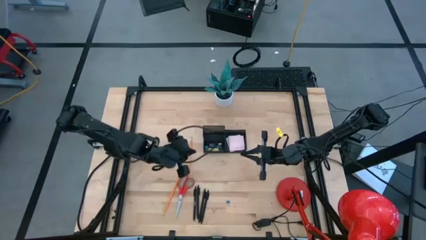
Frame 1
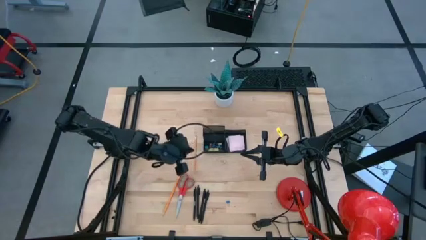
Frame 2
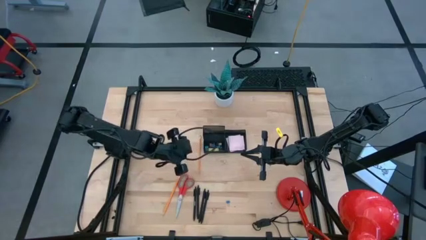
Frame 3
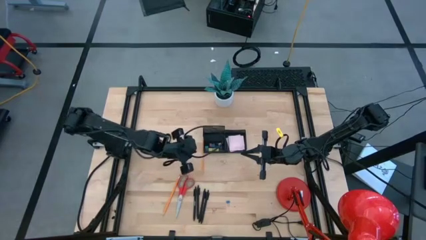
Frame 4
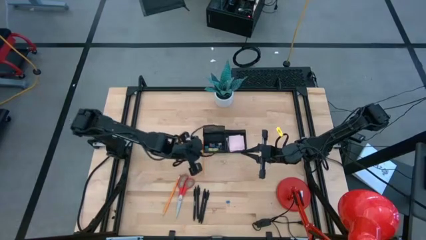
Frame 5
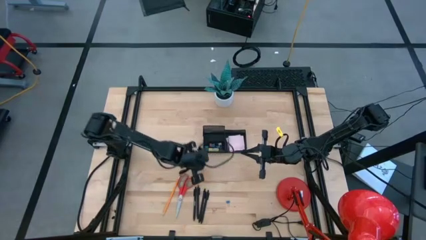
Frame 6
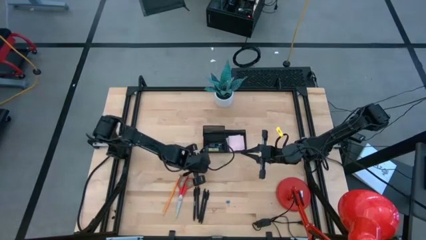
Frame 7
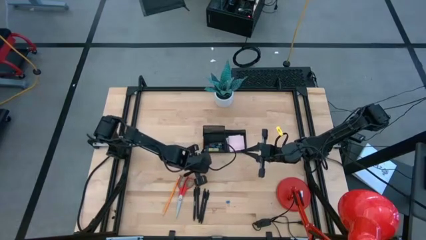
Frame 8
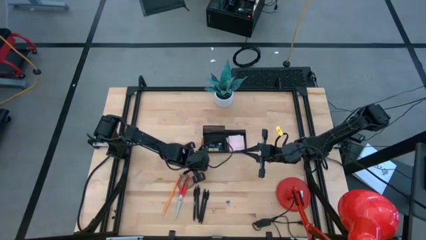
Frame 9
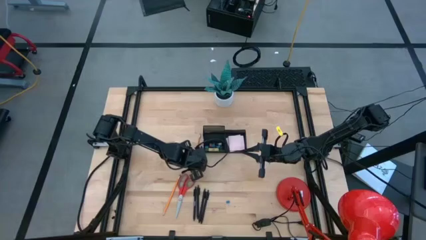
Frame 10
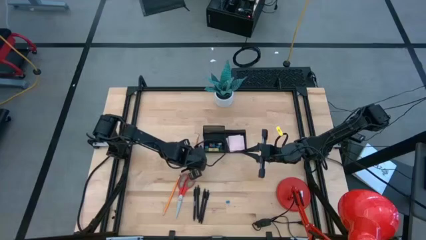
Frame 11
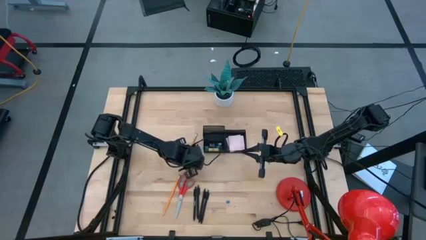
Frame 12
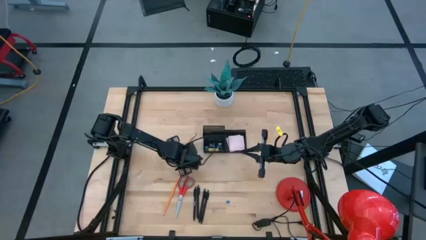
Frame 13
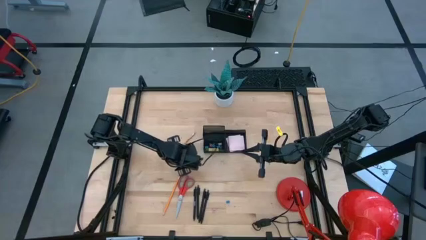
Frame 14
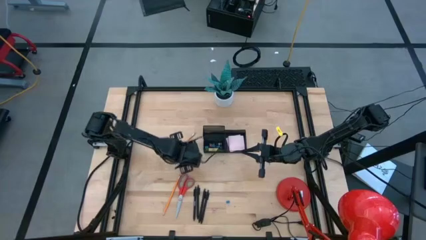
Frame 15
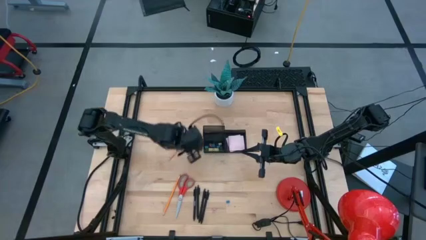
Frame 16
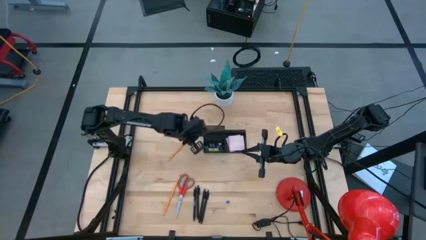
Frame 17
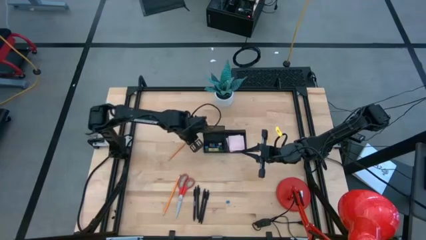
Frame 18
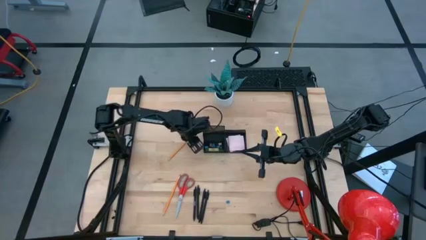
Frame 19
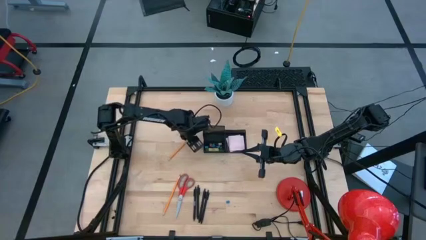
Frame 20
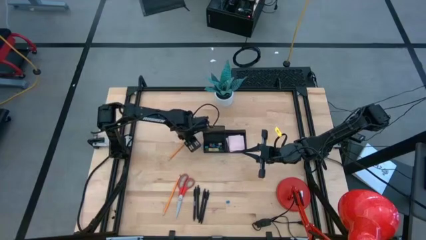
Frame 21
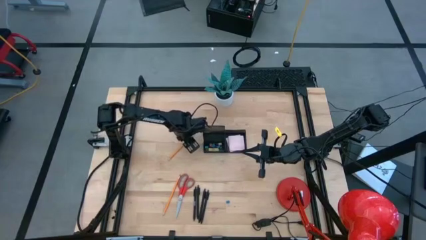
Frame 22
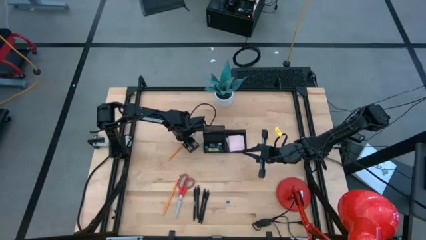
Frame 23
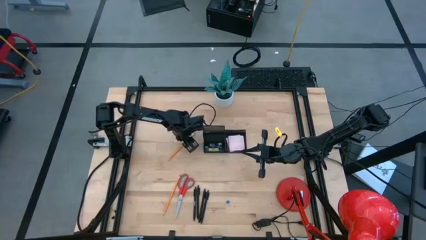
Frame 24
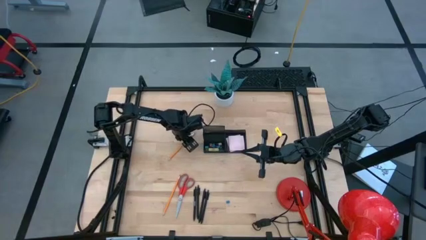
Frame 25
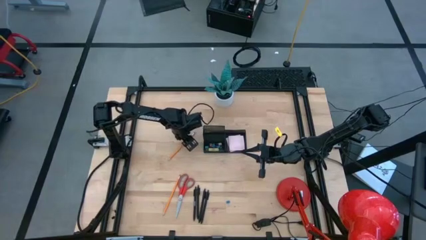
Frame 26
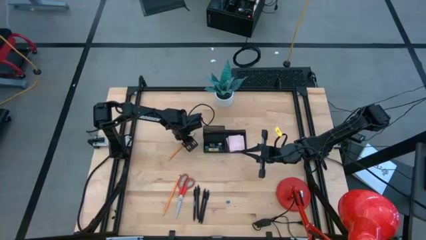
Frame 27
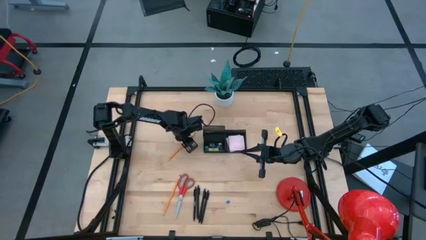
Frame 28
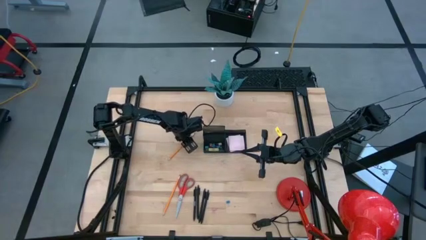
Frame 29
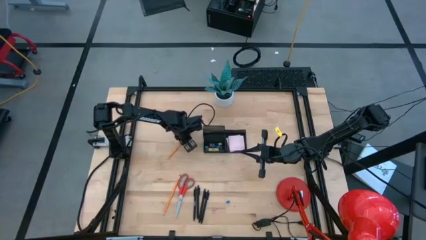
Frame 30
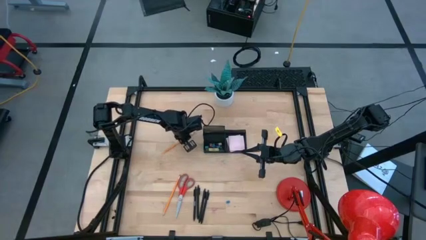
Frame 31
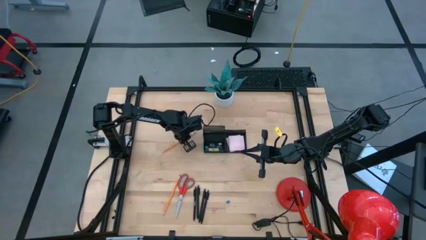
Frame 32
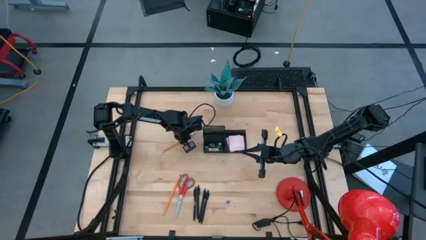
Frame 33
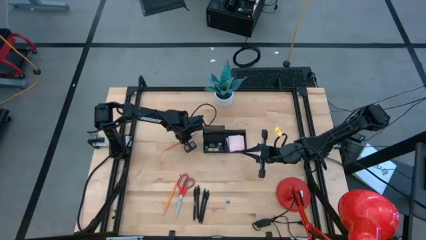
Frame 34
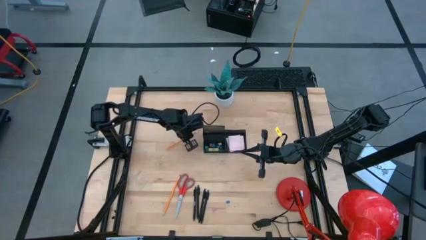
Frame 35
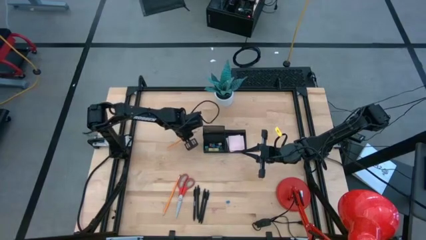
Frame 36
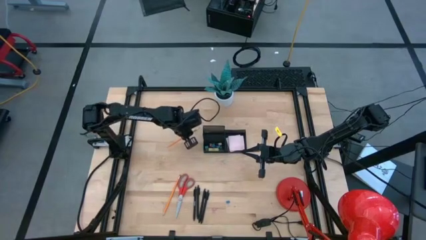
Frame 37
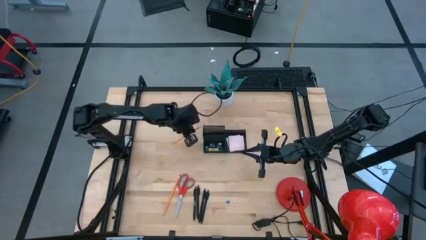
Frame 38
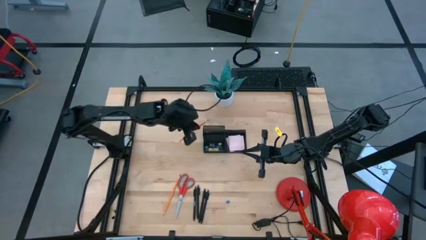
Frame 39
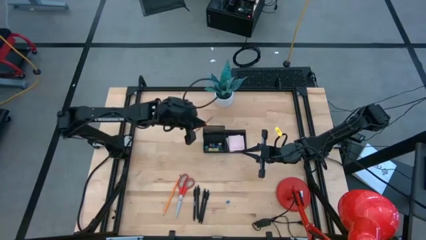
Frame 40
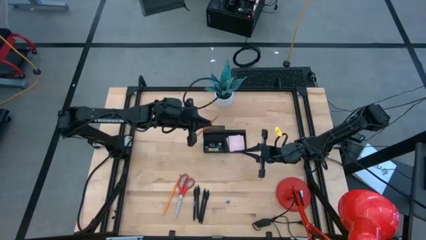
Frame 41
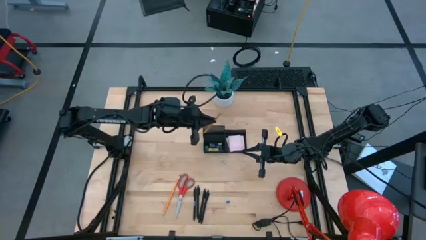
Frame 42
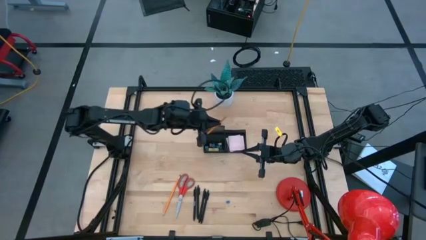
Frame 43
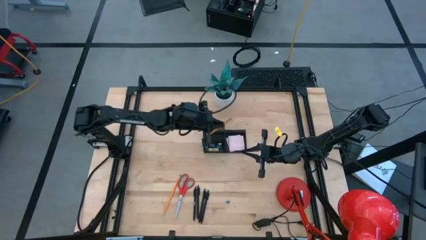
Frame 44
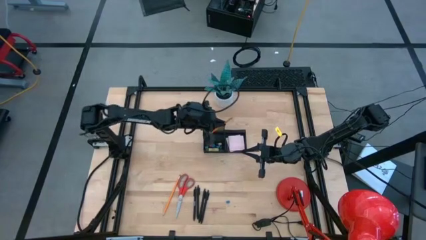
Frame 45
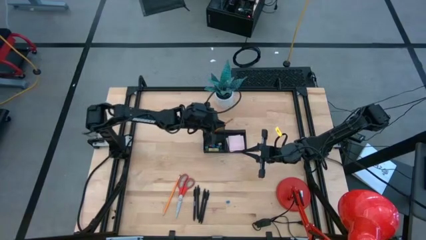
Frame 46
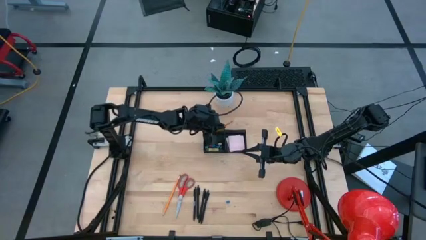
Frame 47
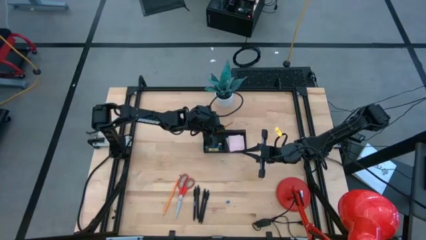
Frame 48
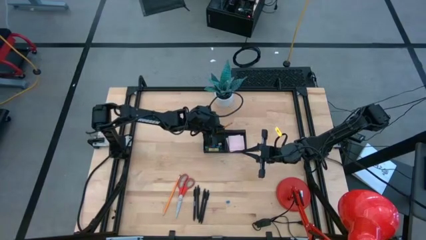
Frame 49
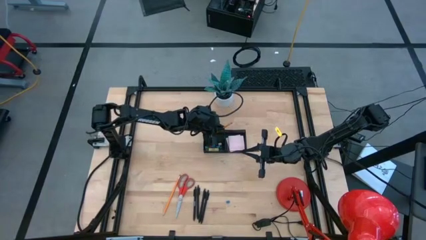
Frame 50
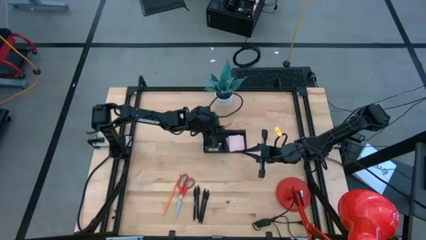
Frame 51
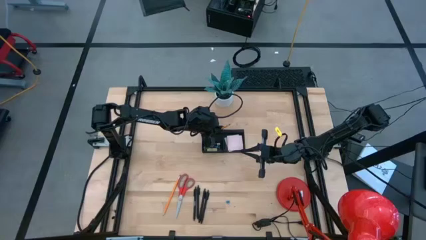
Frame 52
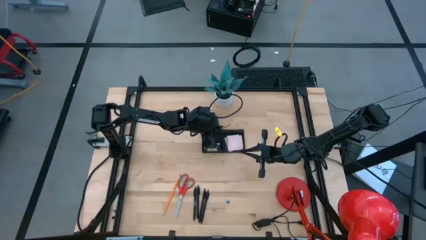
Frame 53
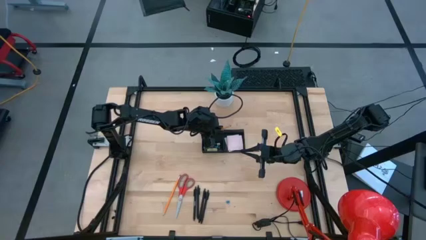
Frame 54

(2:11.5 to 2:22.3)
Task: Pick and place office supplies into organizer
Put the left orange pencil into the black desk organizer

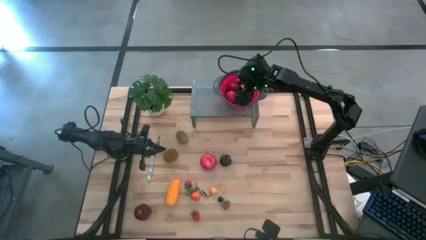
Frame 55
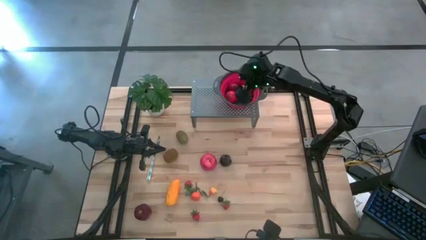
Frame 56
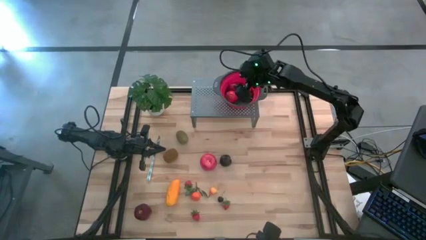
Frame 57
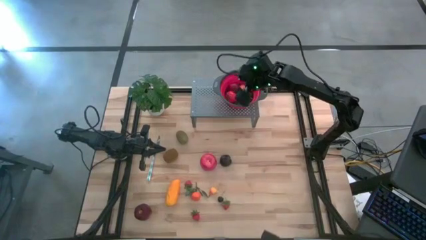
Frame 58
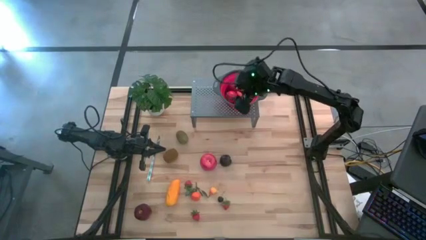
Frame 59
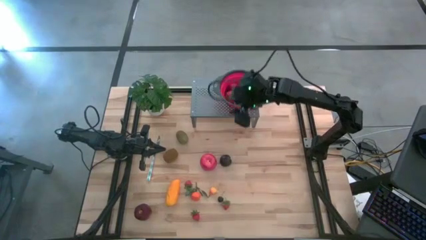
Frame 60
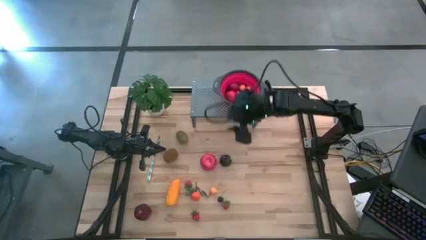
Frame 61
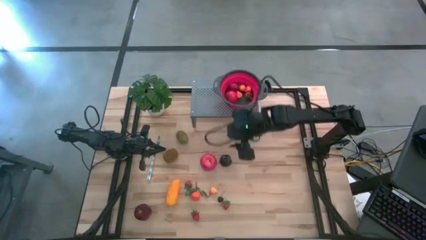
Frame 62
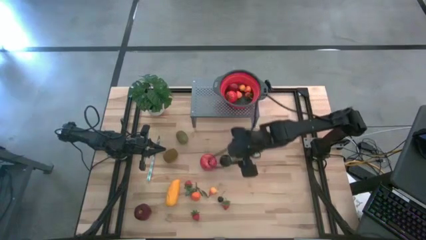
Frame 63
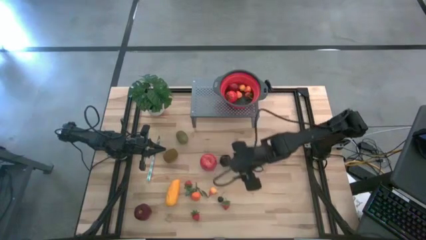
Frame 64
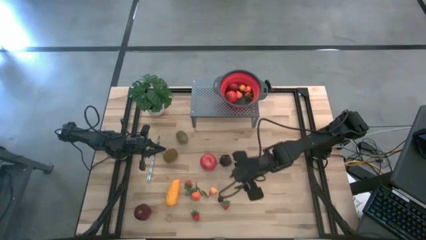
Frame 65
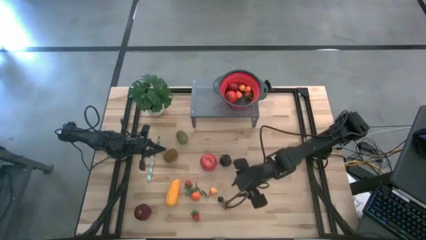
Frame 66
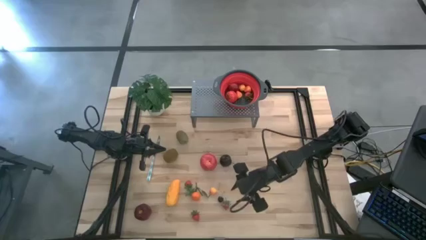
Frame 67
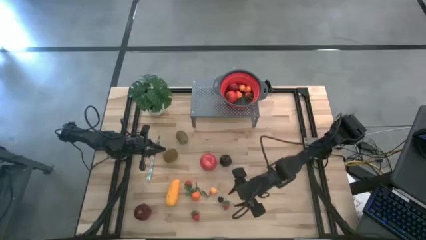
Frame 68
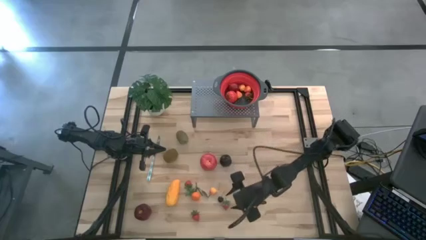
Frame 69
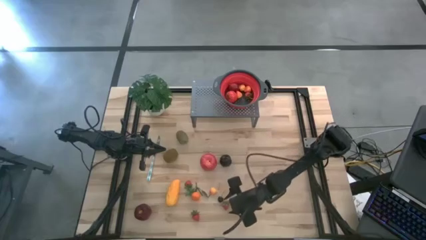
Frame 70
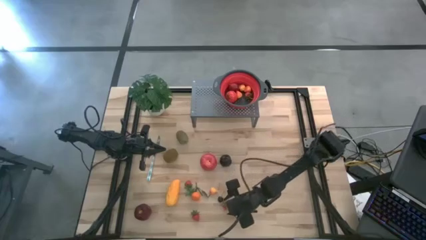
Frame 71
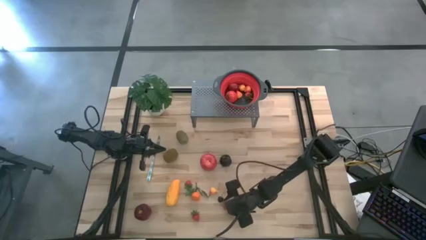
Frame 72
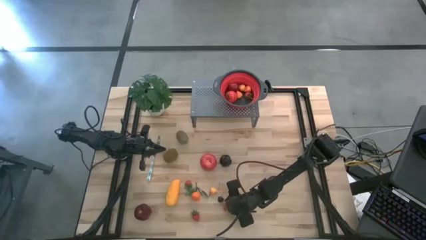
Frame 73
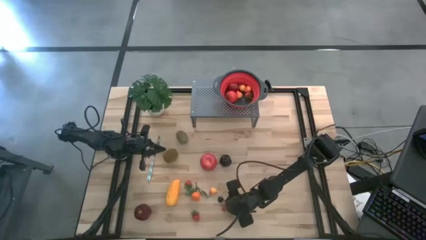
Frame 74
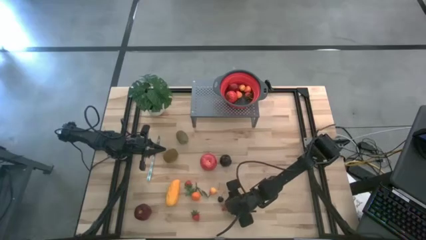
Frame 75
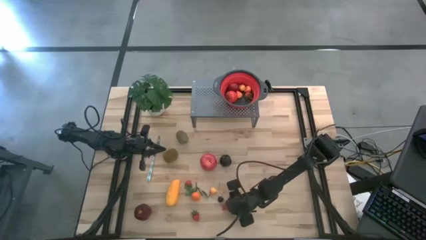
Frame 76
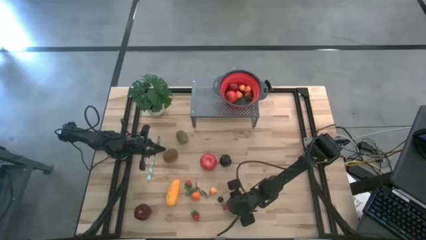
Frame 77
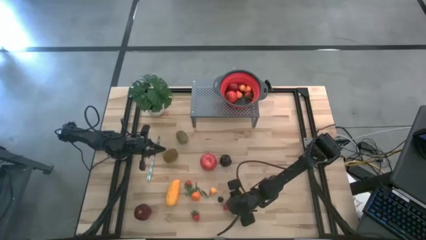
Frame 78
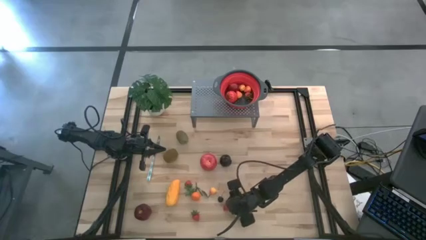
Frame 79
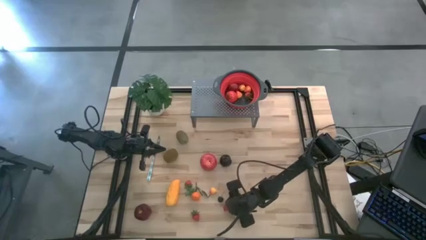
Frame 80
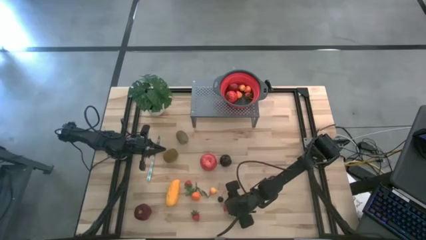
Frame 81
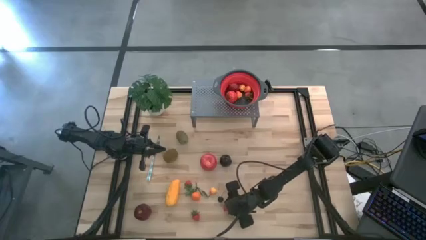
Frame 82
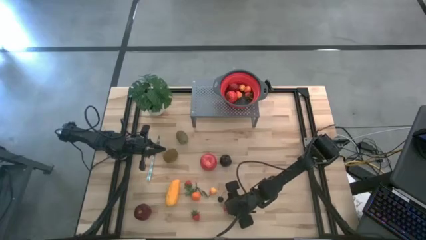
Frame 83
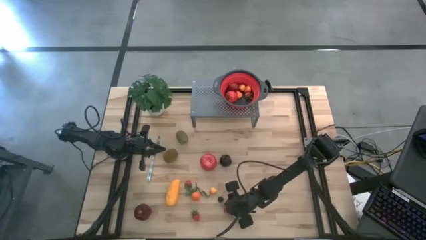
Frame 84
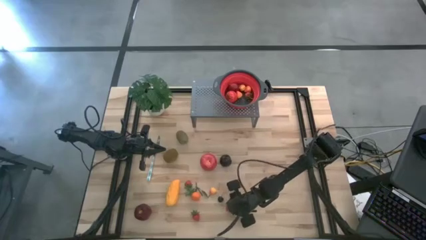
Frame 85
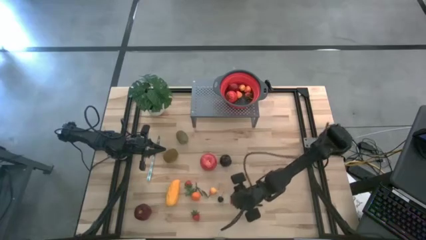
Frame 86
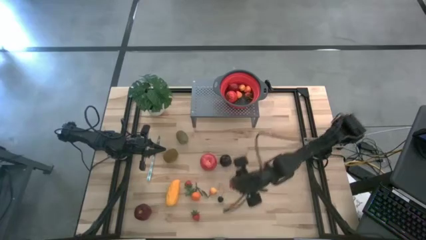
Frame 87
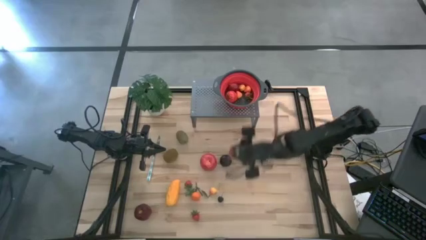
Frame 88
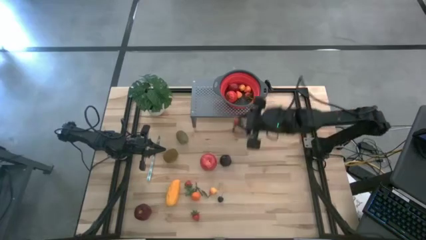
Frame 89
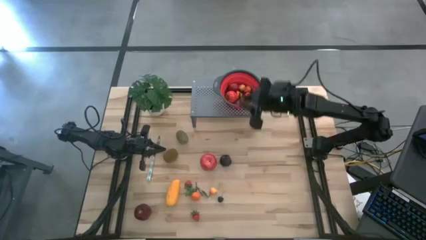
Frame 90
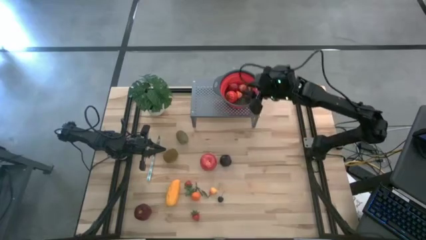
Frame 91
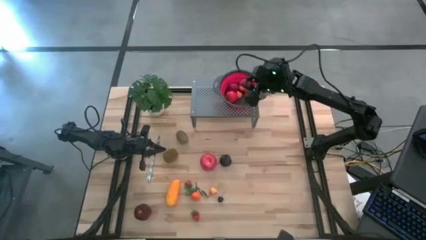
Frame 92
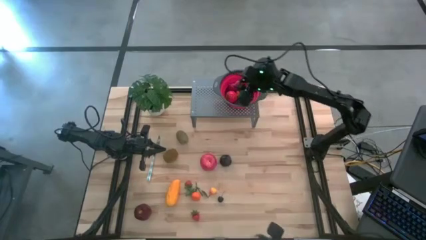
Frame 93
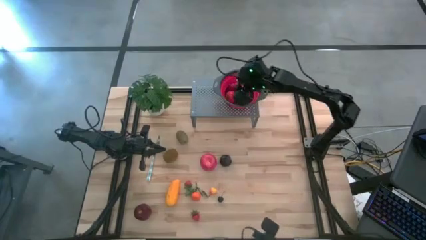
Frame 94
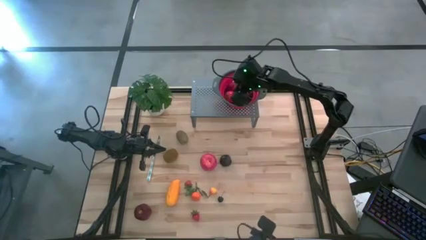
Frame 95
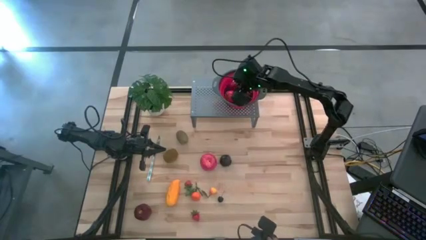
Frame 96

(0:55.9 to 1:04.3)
Task: Pick & Place Fruit
Put the strawberry into the strainer bowl on the shelf
